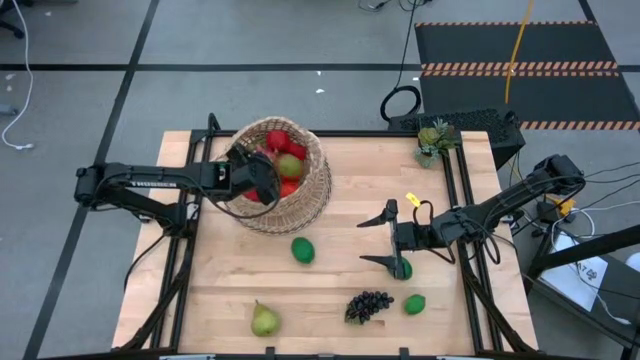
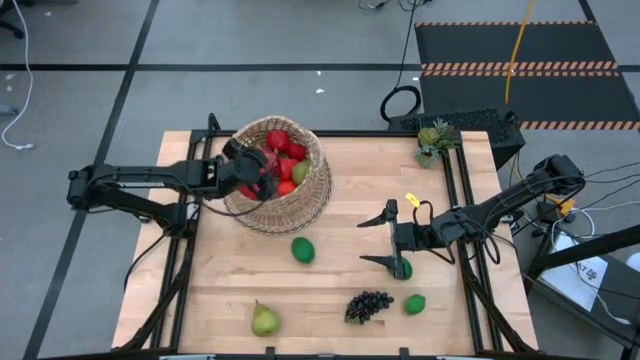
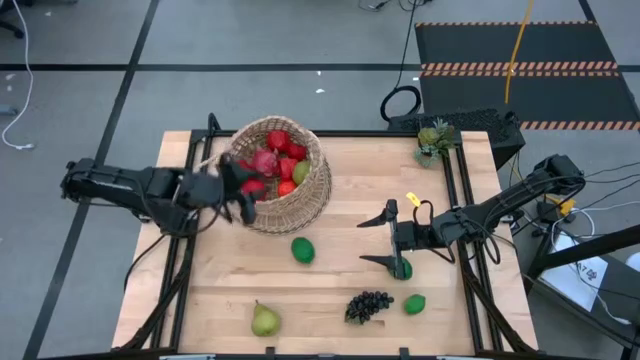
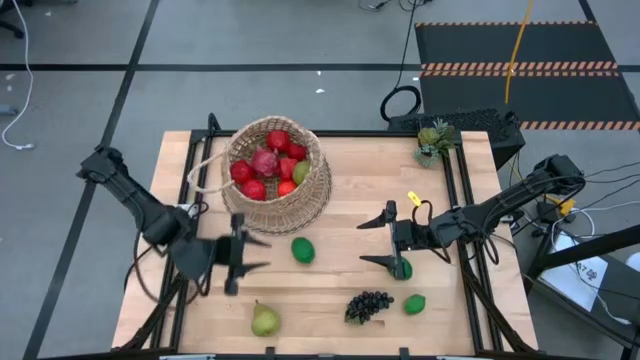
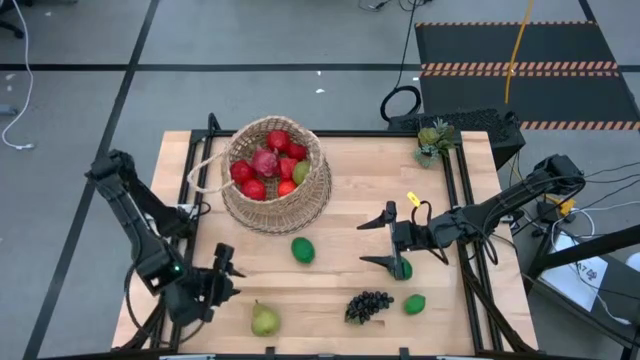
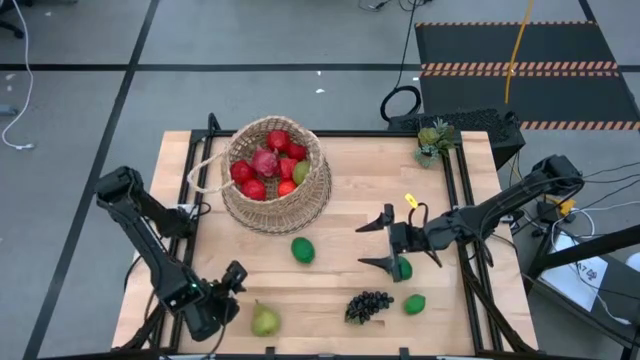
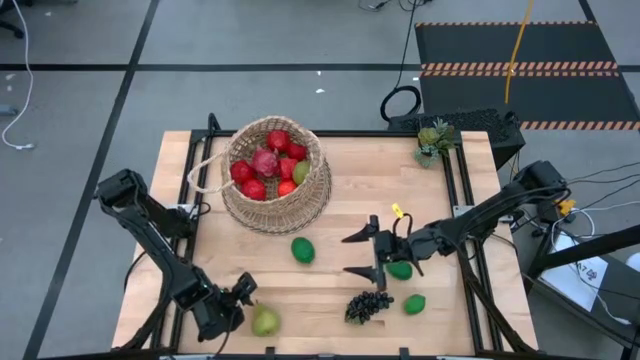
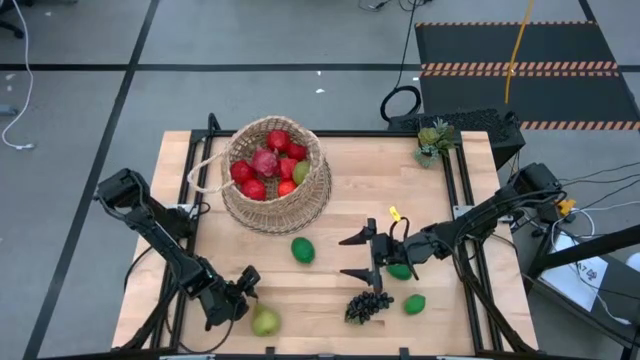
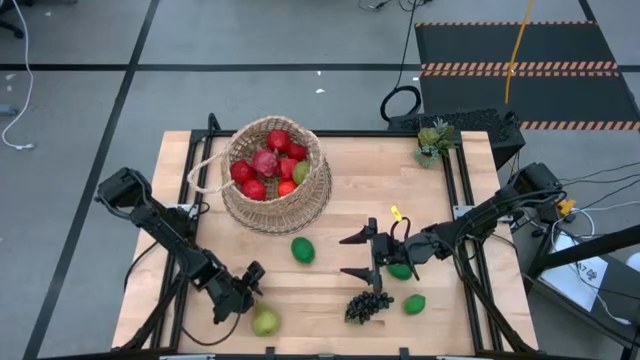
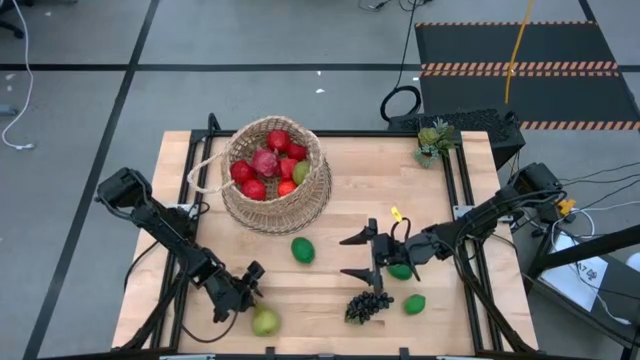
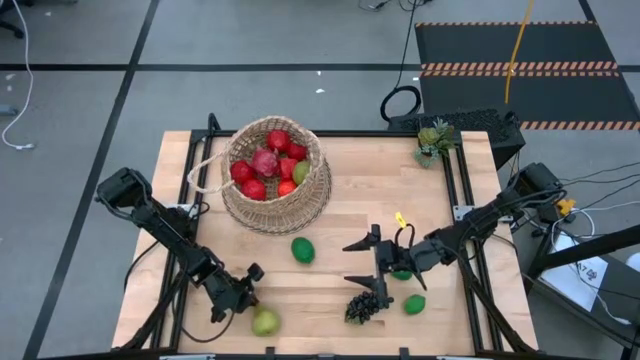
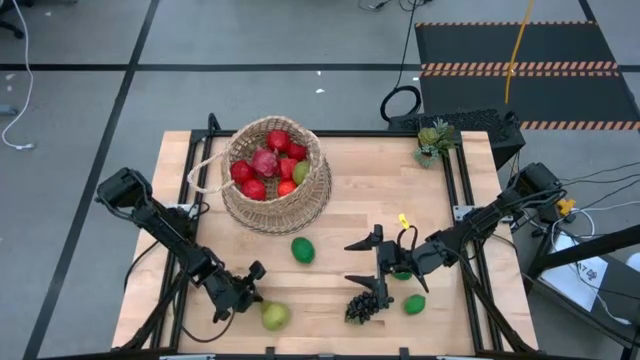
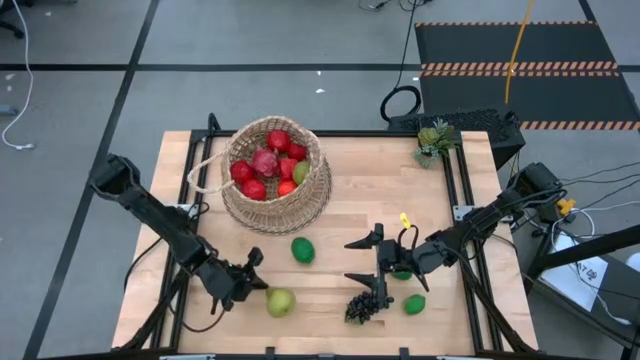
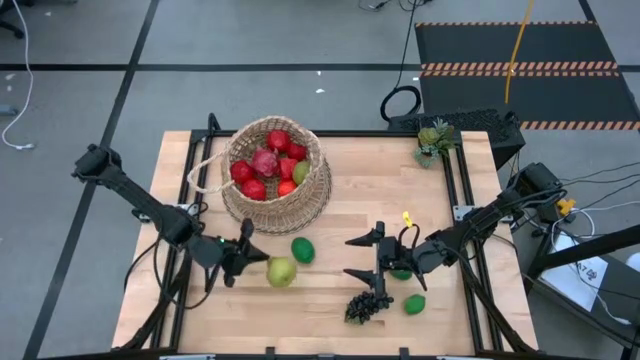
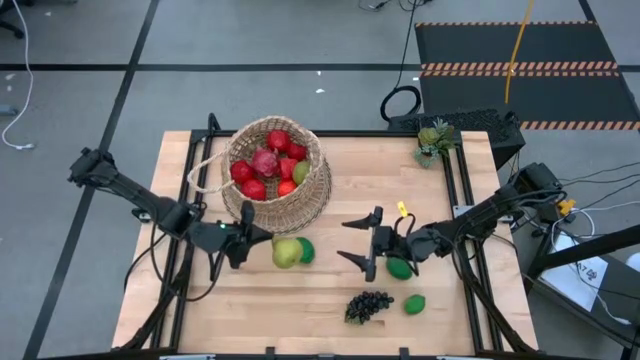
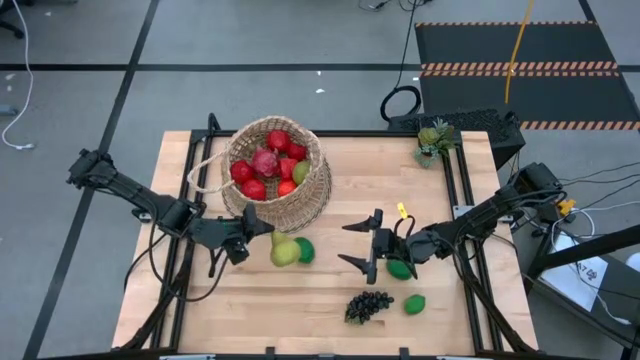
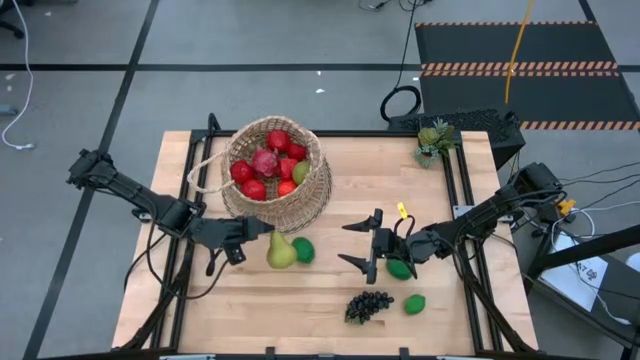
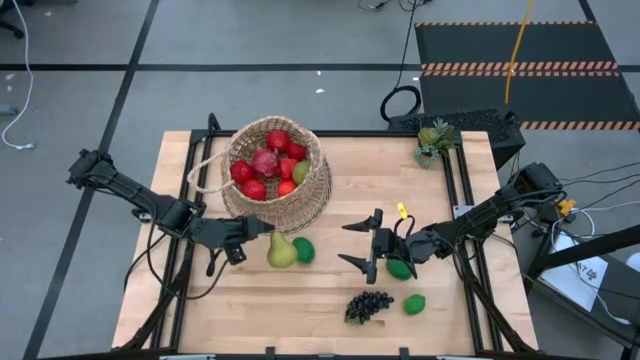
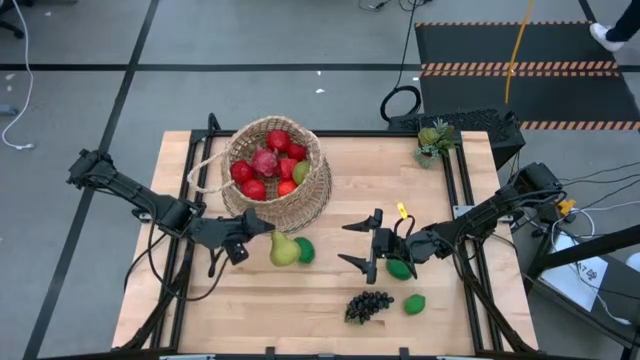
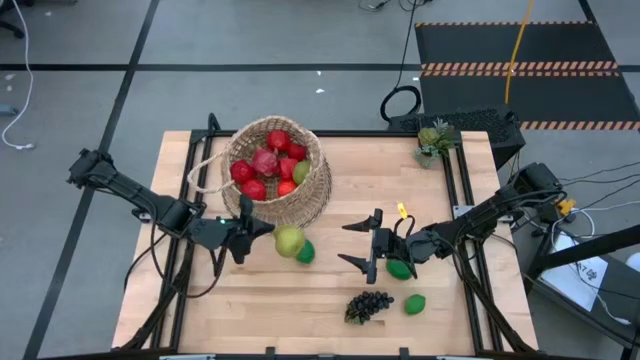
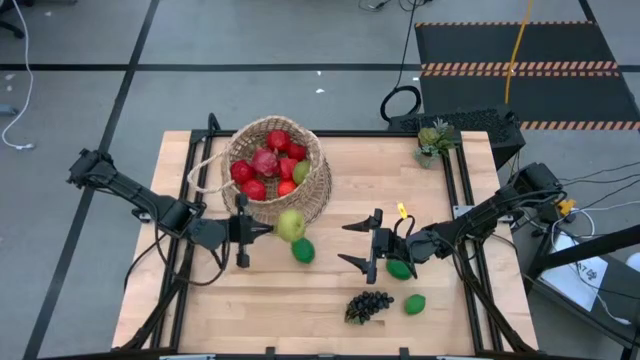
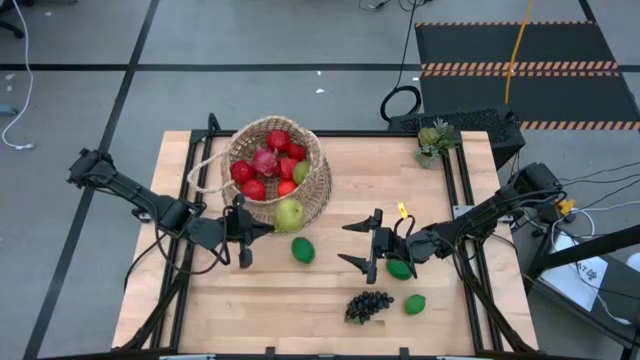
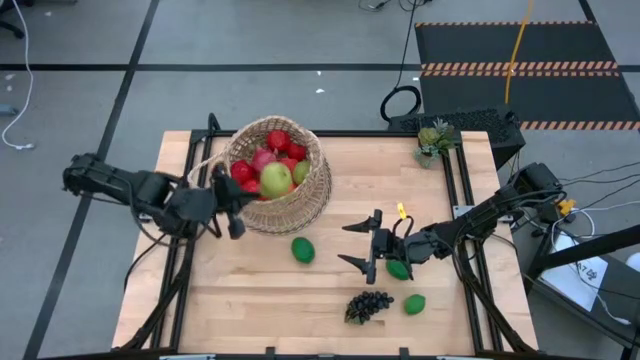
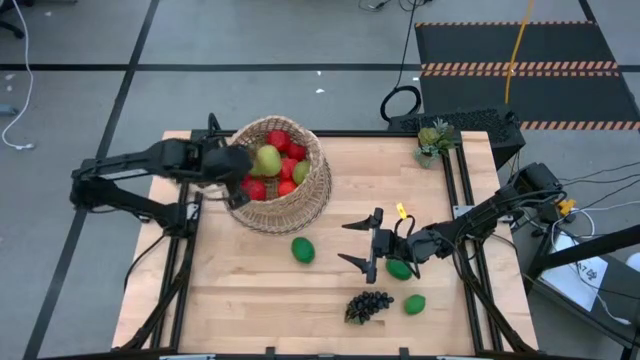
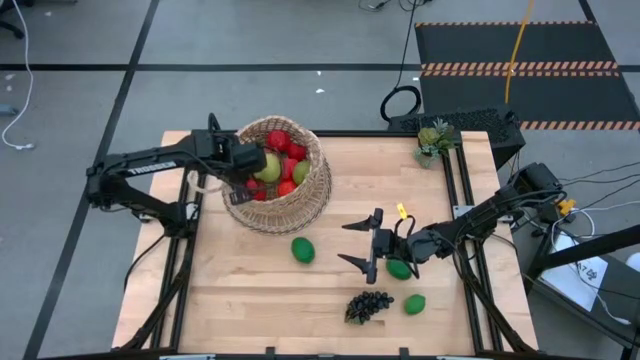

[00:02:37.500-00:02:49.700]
Task: Build produce basket
Put the pear into the basket

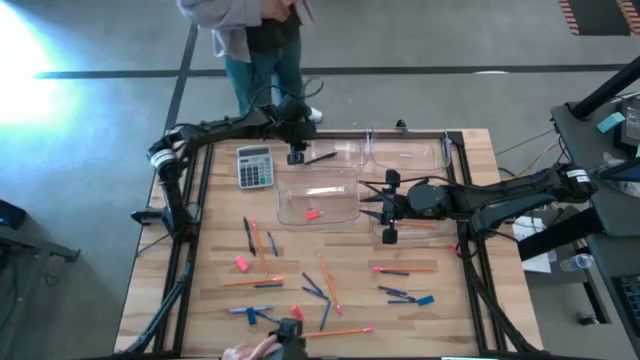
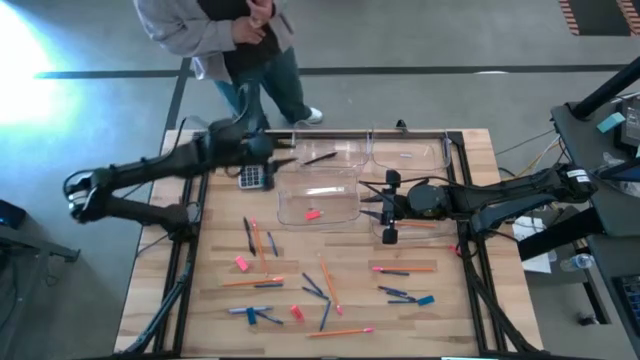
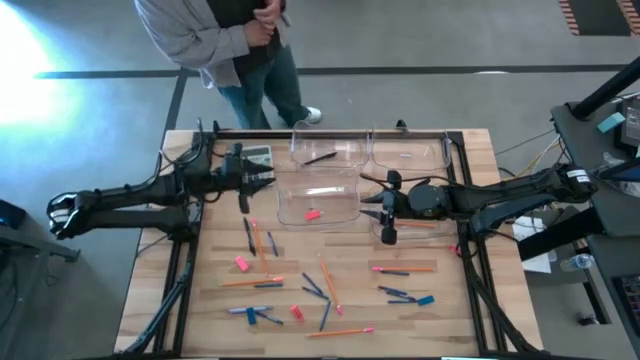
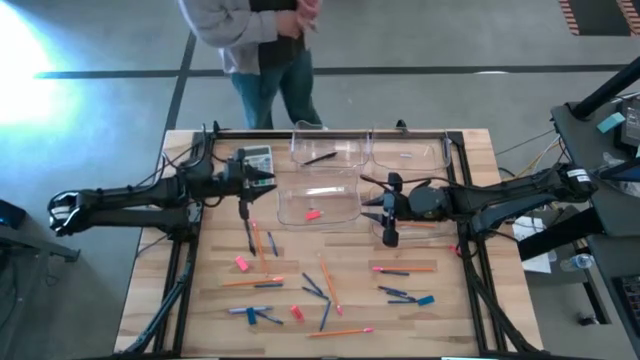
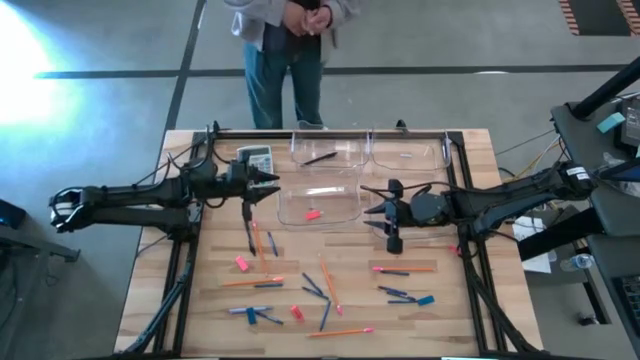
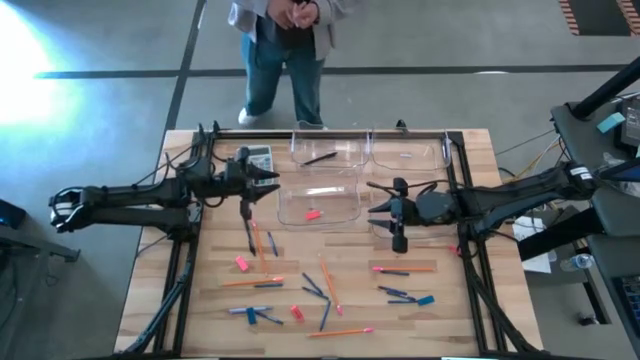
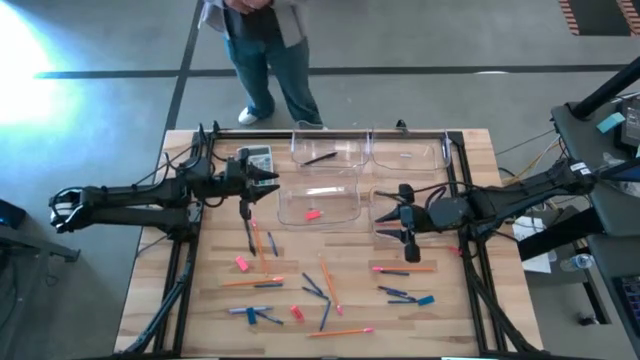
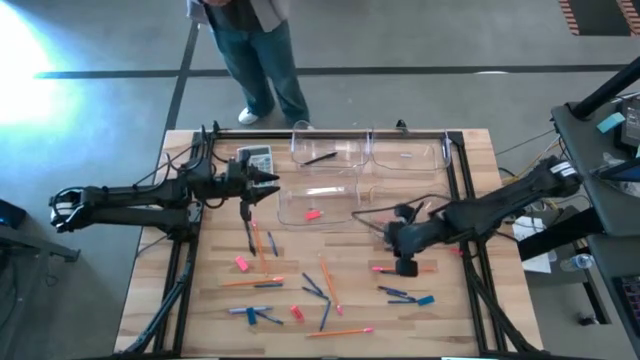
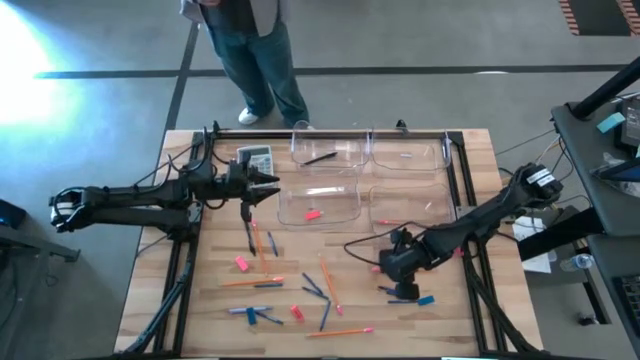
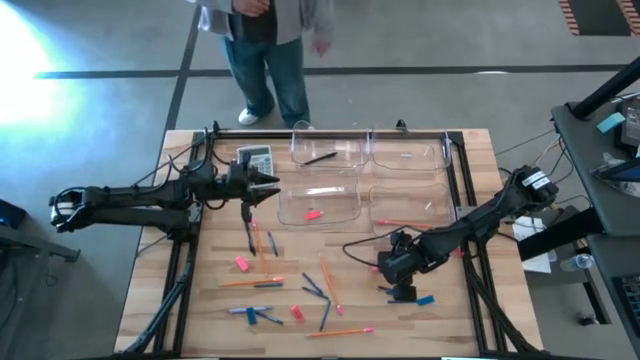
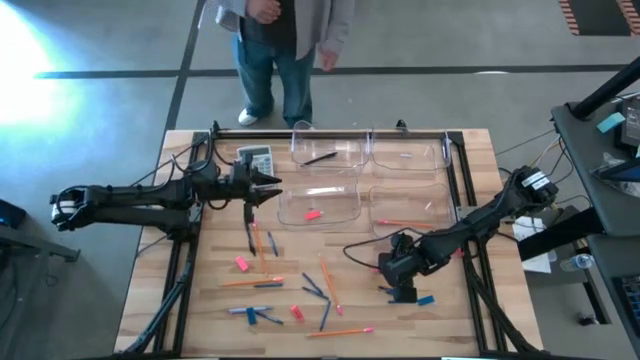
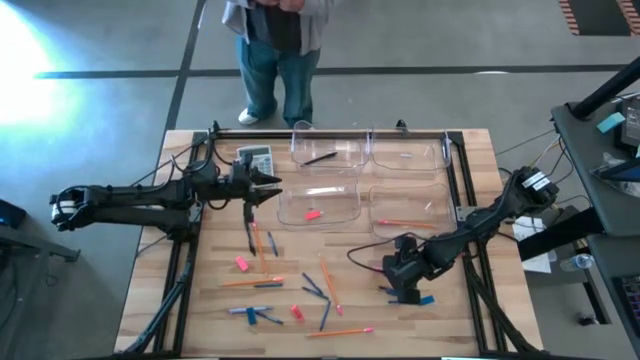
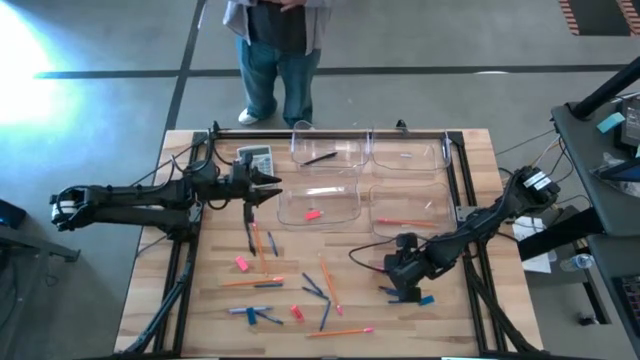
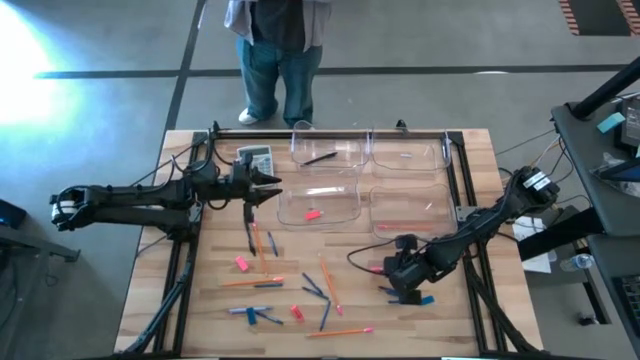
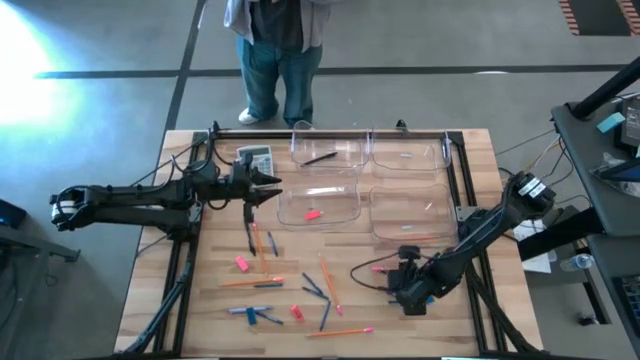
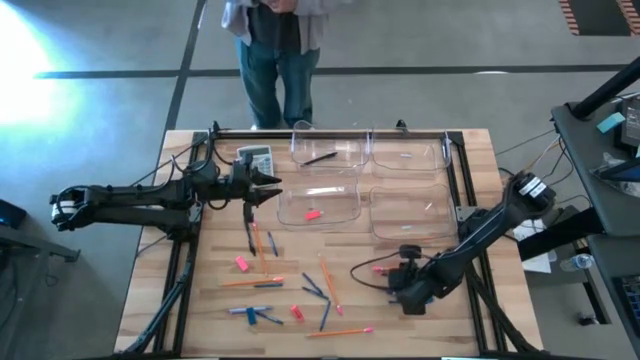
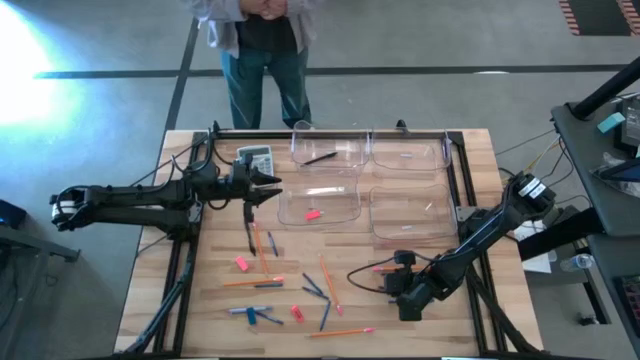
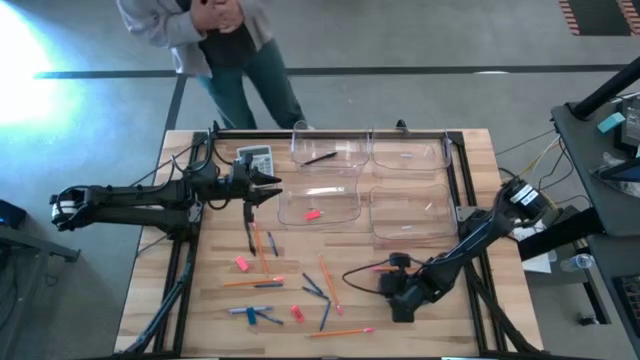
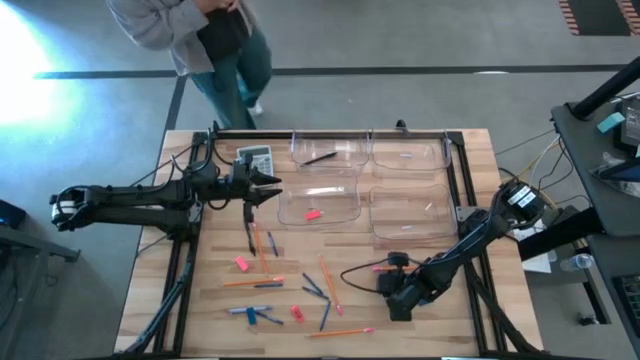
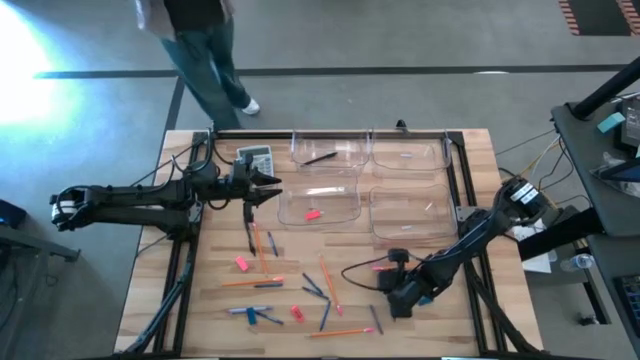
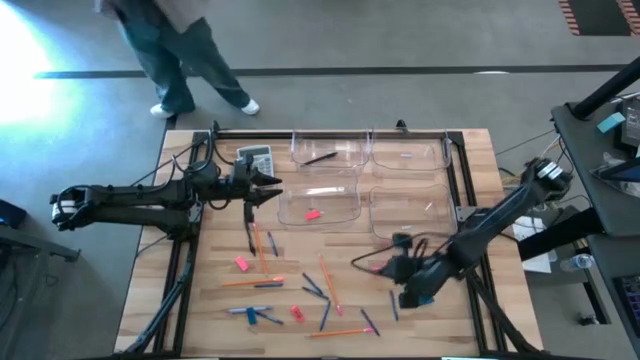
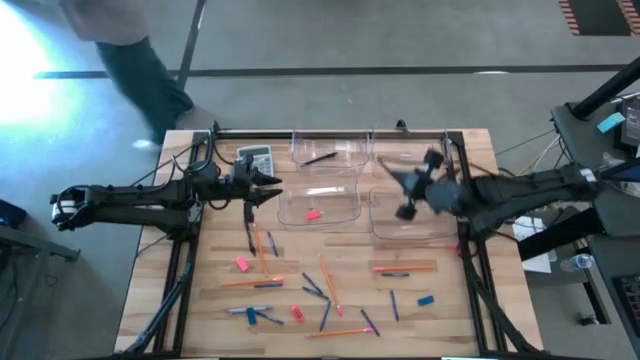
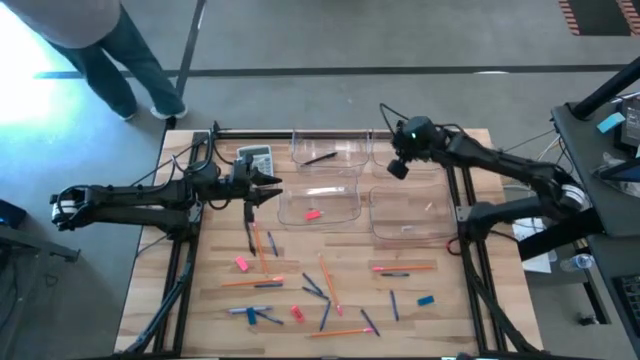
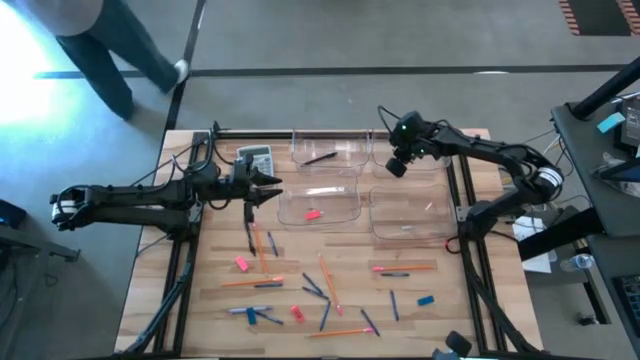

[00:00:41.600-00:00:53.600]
Task: Sort crayons/erasers/pens/pencils in bins
Put the blue crayon into the top right transparent bin
